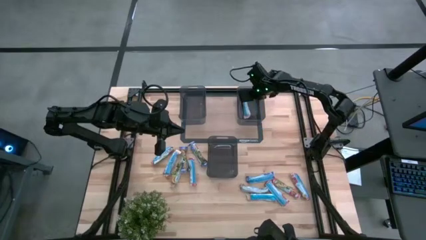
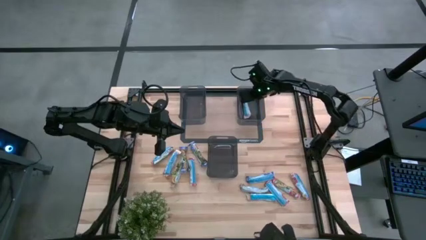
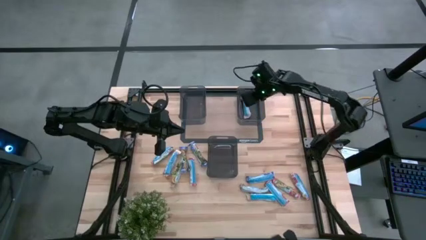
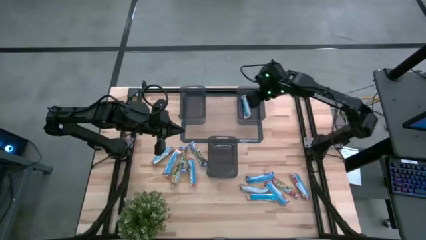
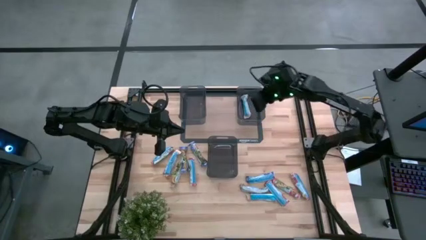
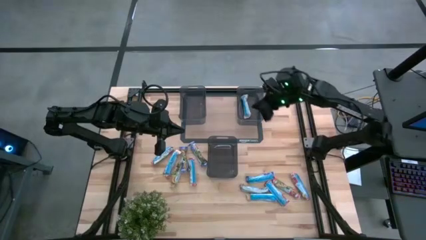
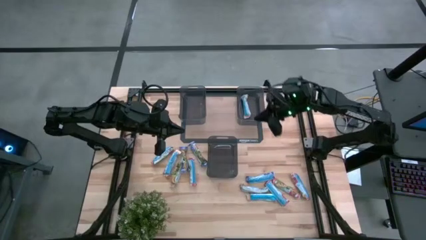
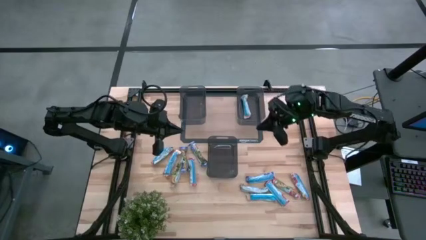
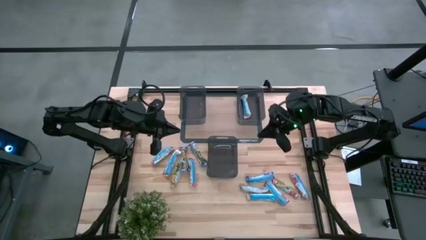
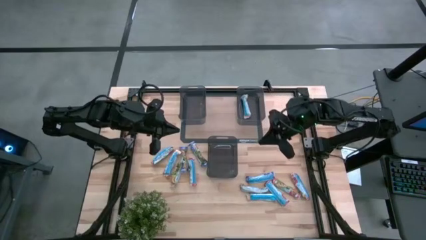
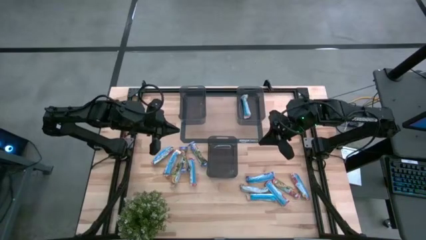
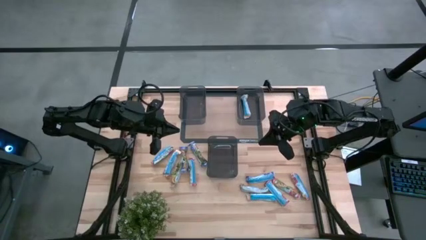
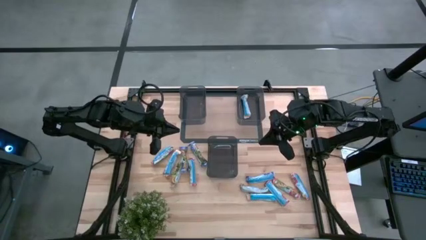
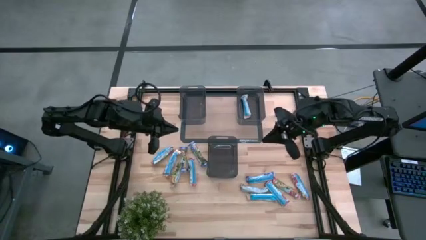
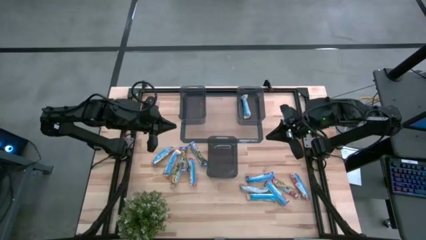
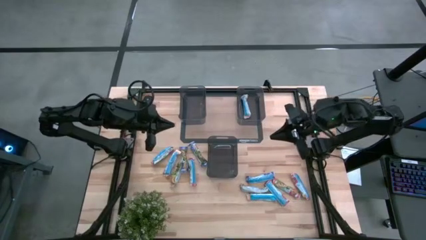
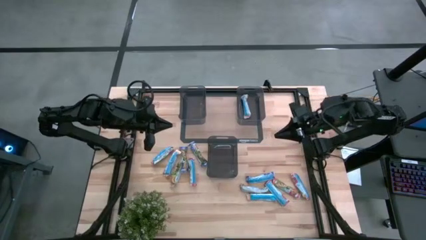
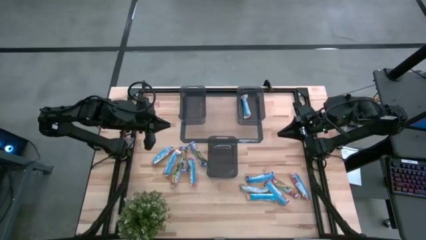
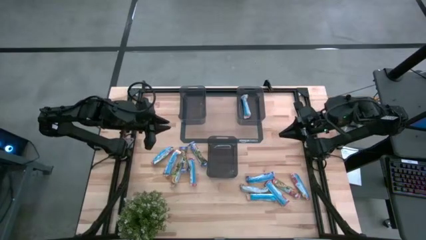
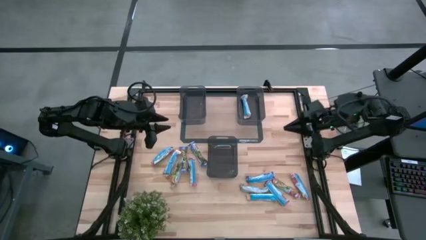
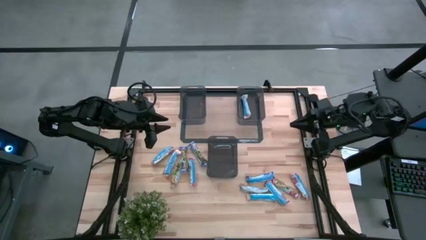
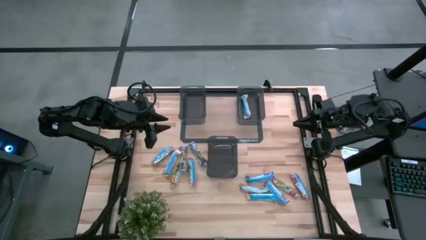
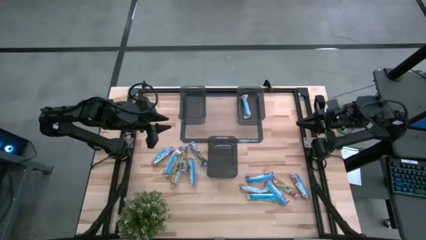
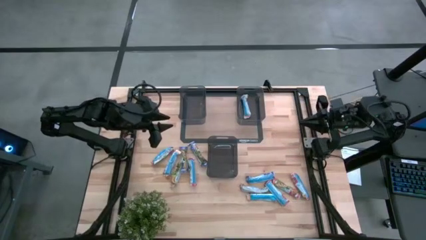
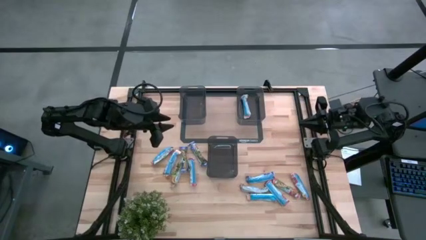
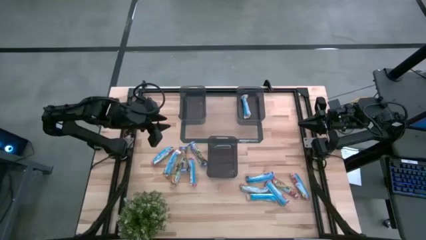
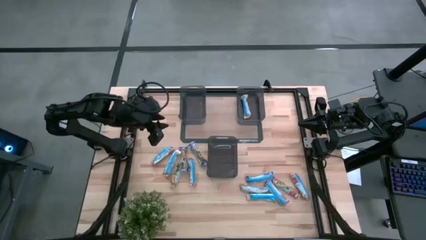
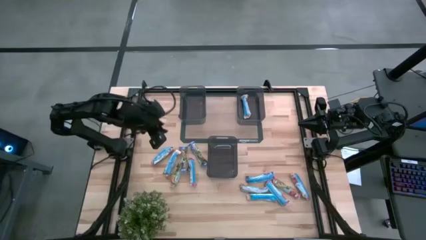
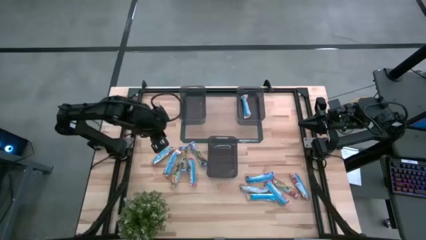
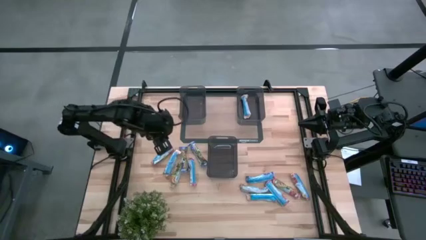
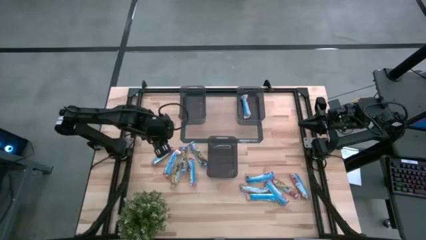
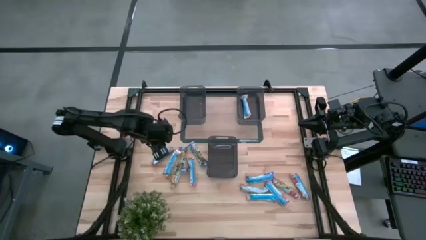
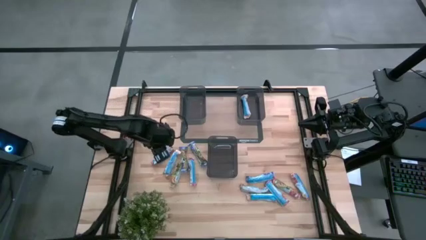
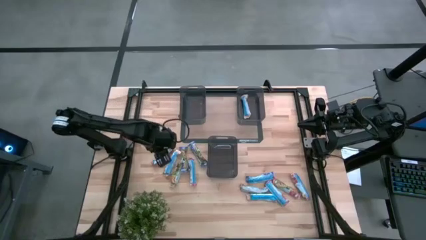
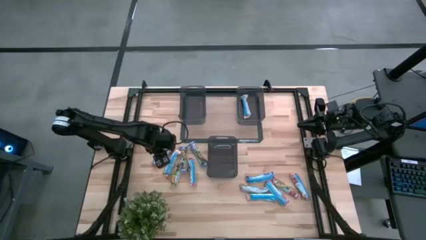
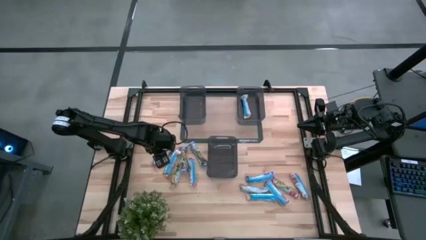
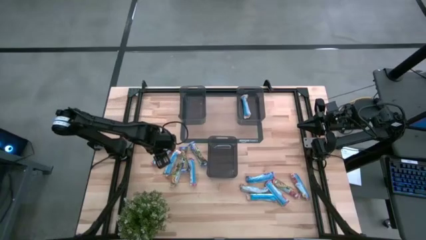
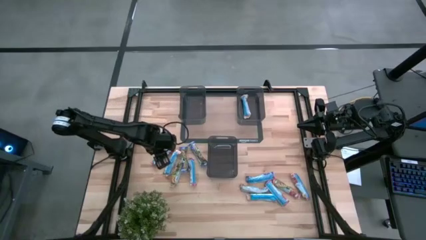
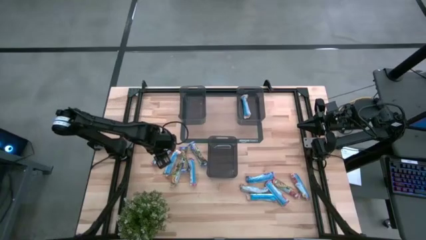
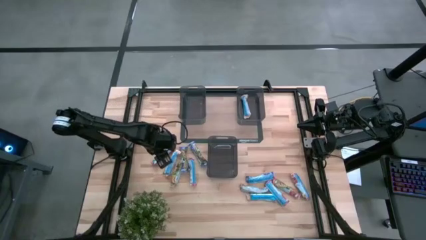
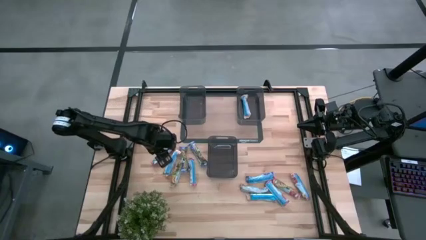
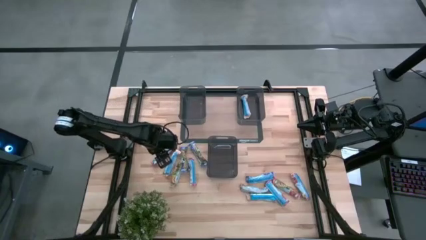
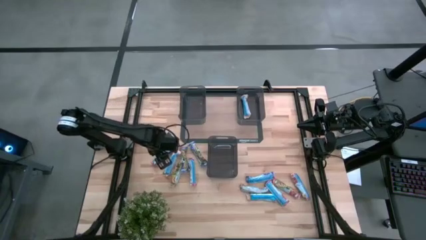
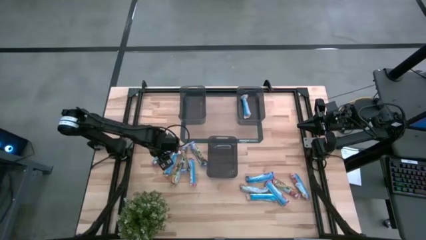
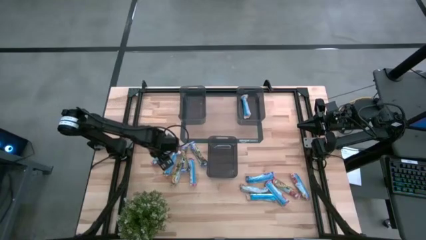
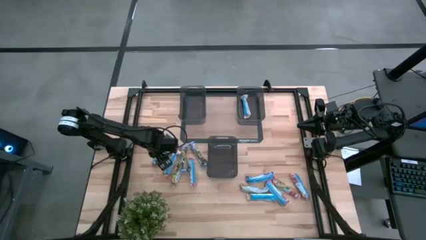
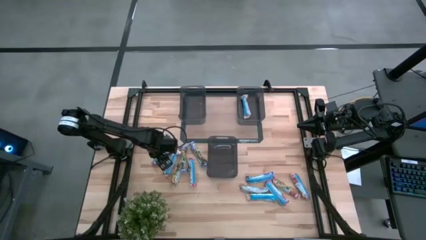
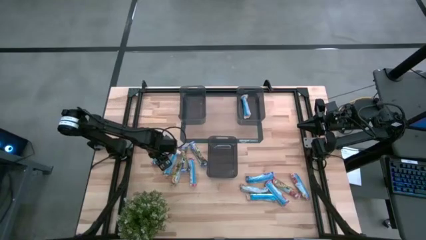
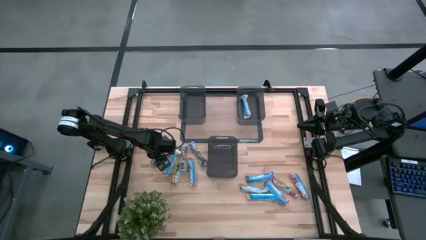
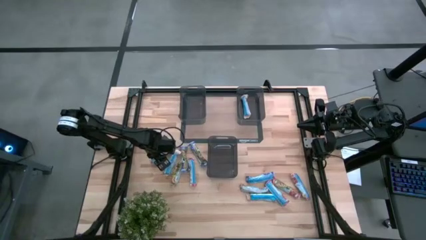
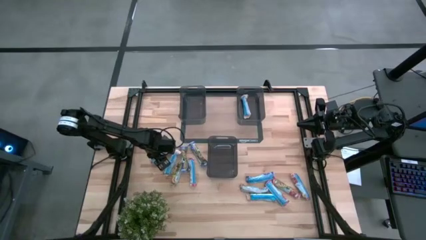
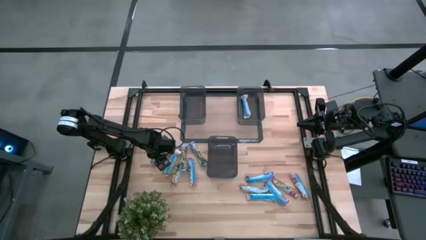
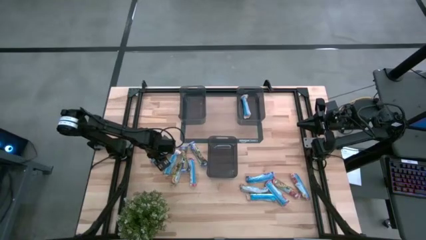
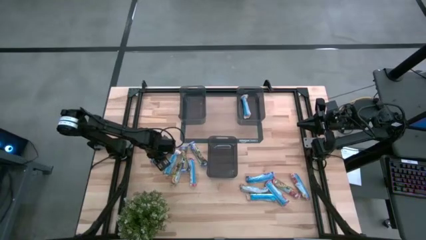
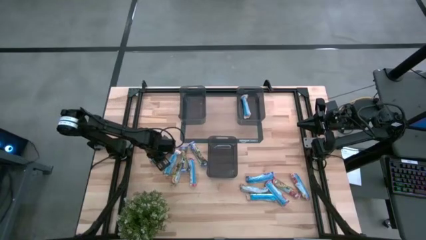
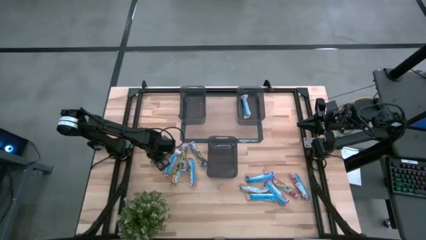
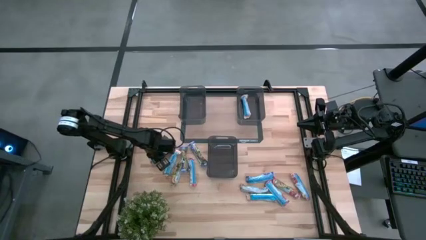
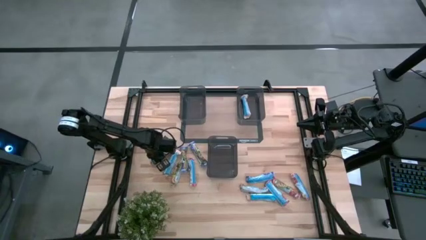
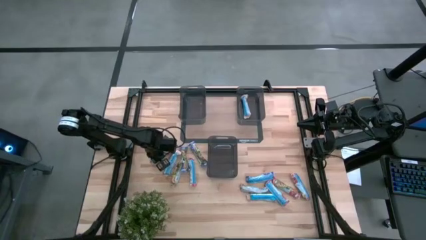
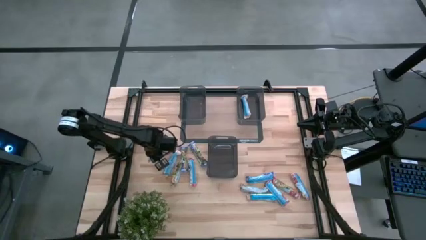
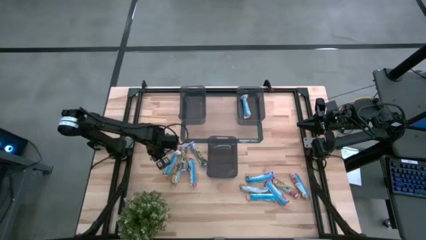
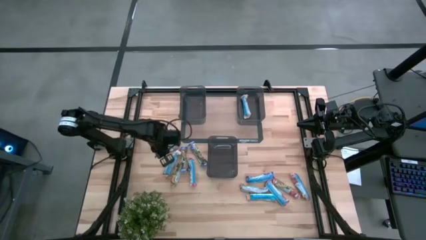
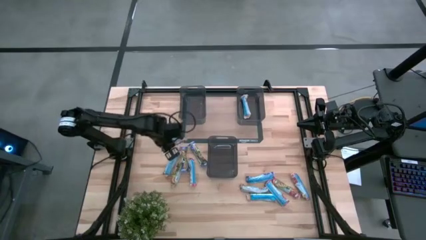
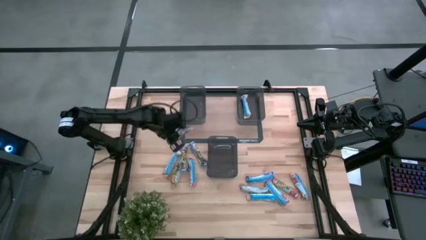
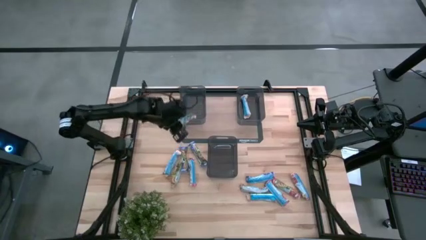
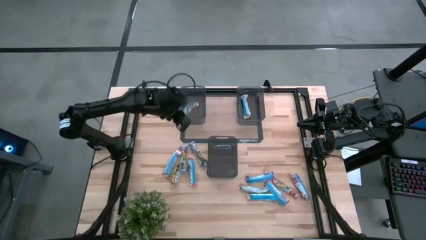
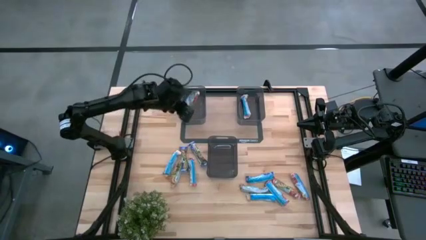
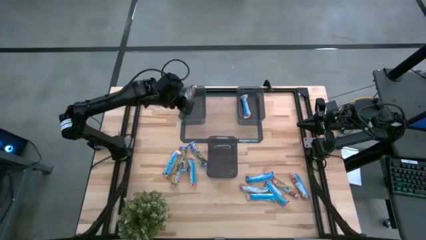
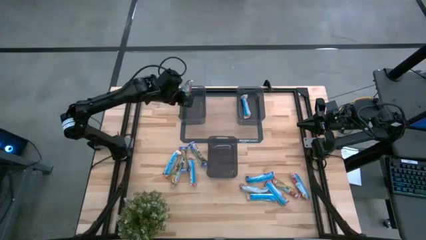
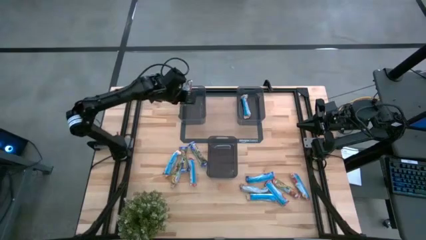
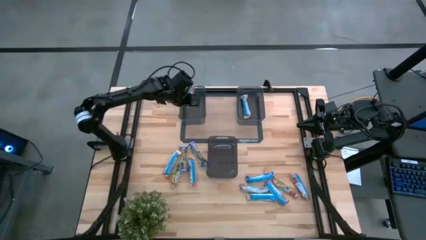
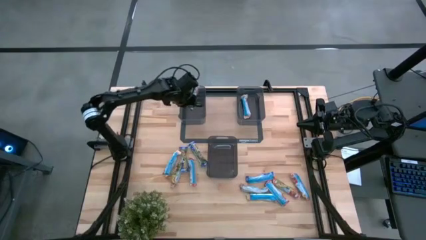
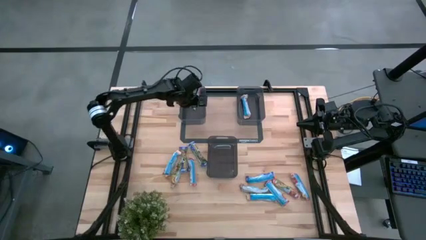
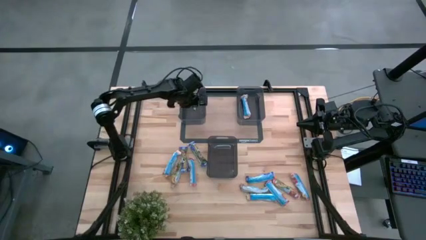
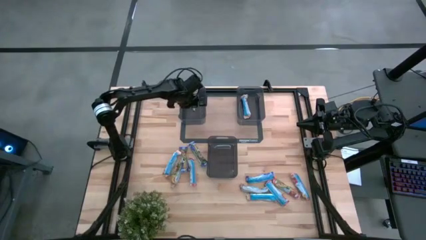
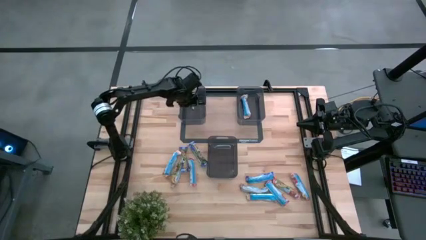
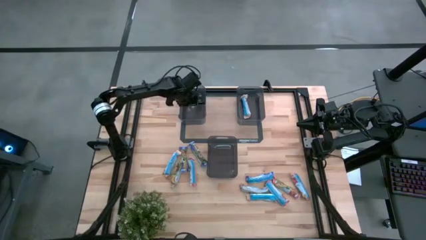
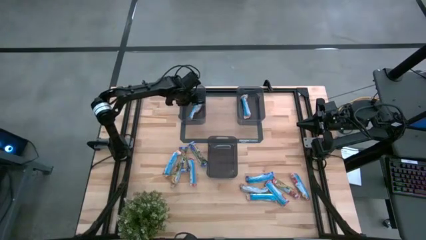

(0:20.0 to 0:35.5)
Task: Pick and place Granola Bars by type
Put the red granola bar into the left black bin
